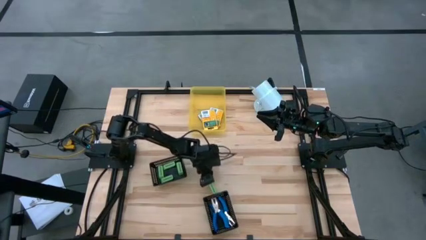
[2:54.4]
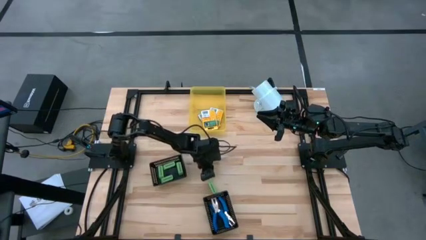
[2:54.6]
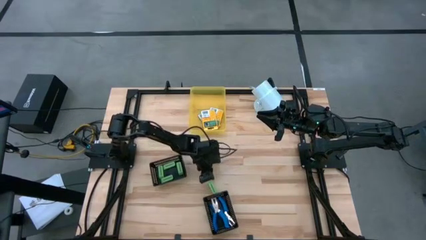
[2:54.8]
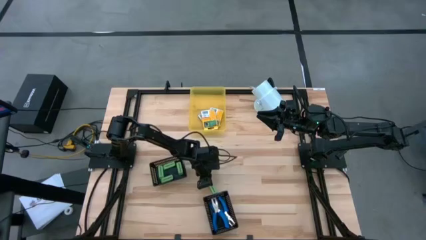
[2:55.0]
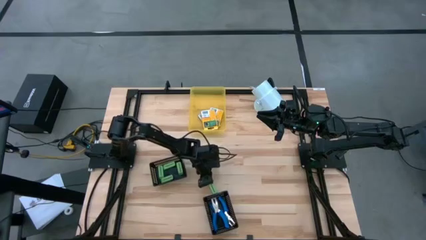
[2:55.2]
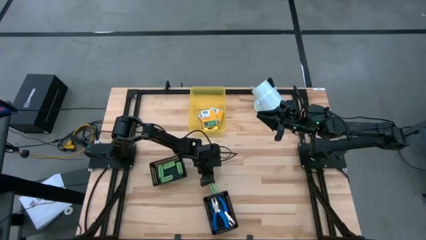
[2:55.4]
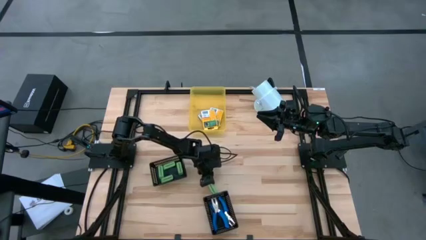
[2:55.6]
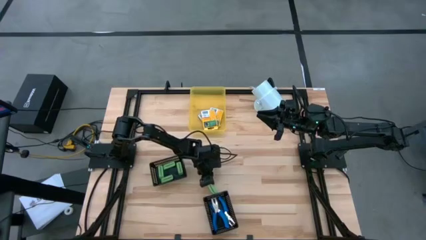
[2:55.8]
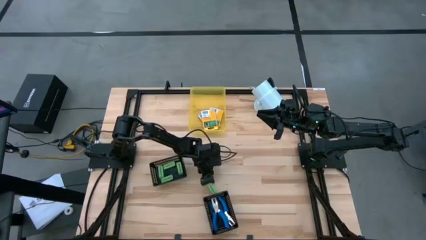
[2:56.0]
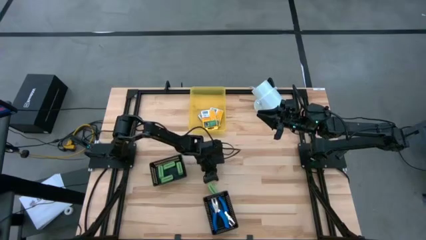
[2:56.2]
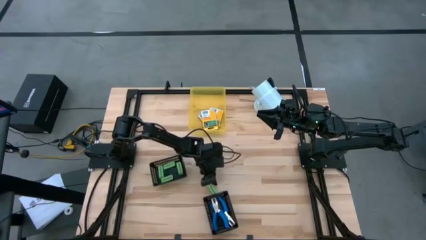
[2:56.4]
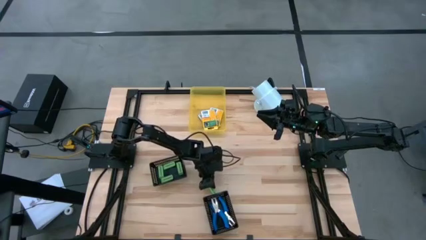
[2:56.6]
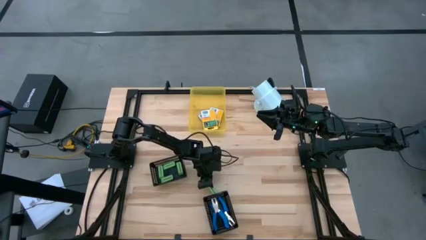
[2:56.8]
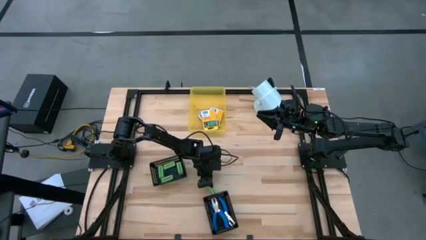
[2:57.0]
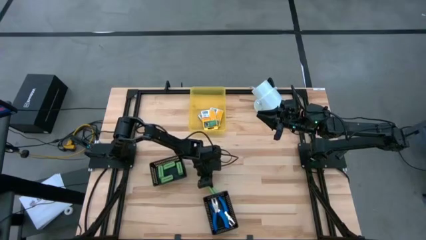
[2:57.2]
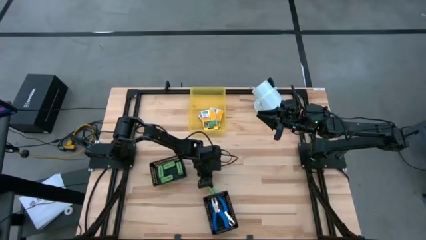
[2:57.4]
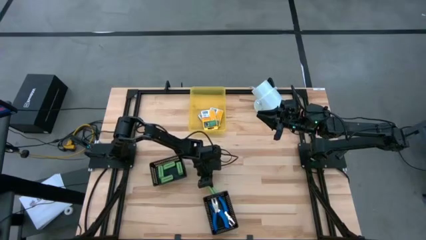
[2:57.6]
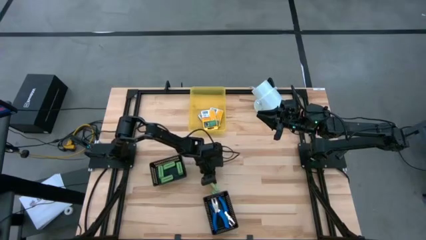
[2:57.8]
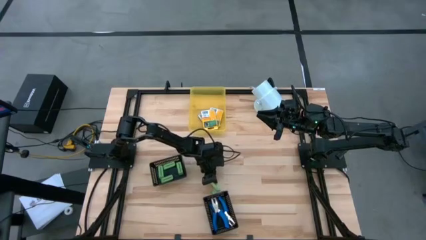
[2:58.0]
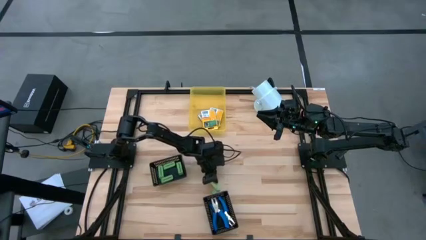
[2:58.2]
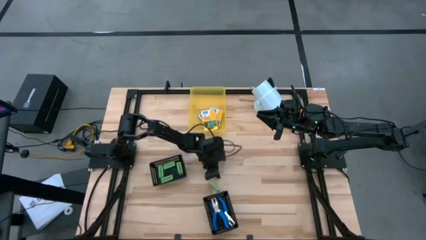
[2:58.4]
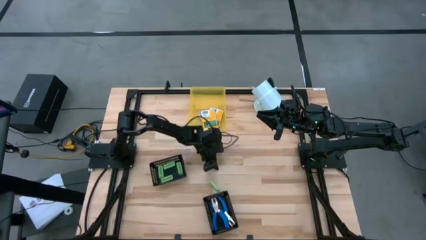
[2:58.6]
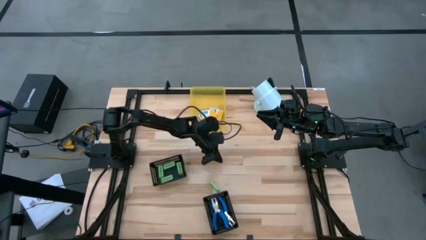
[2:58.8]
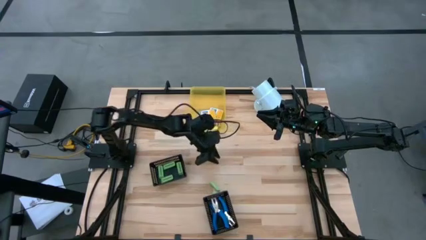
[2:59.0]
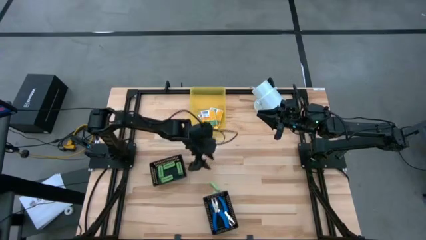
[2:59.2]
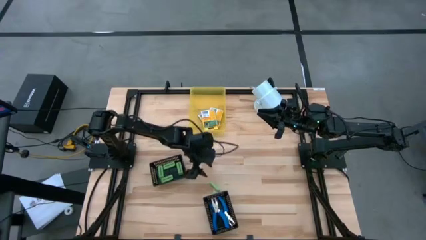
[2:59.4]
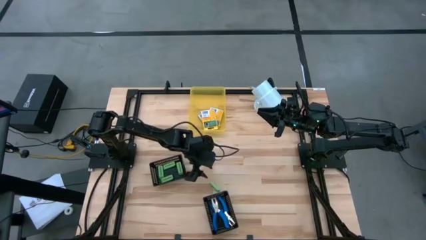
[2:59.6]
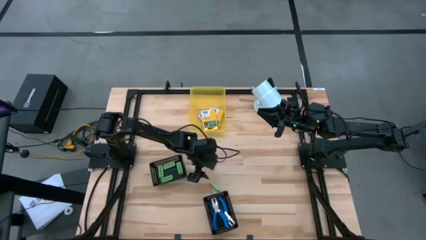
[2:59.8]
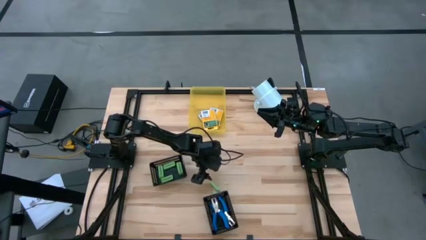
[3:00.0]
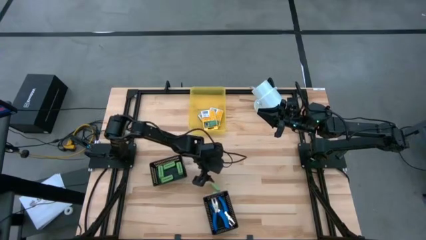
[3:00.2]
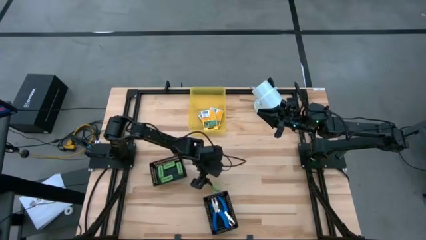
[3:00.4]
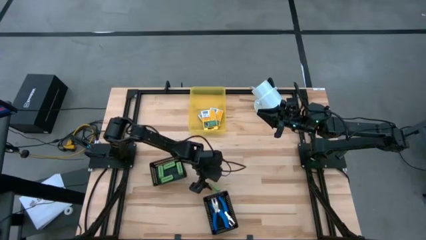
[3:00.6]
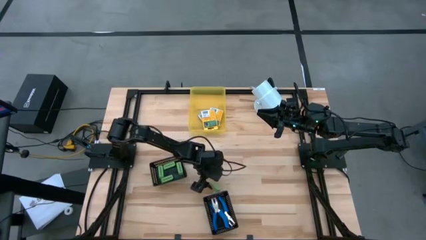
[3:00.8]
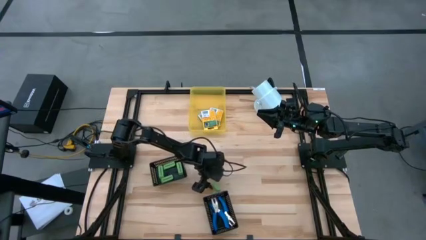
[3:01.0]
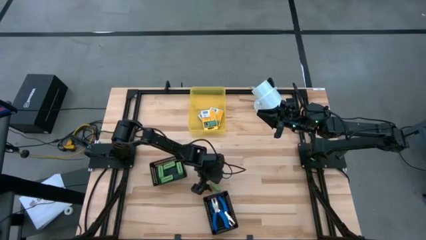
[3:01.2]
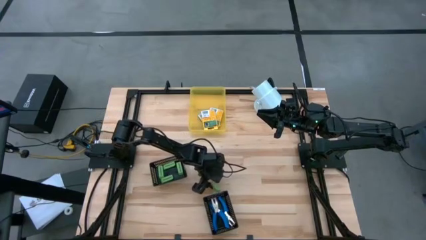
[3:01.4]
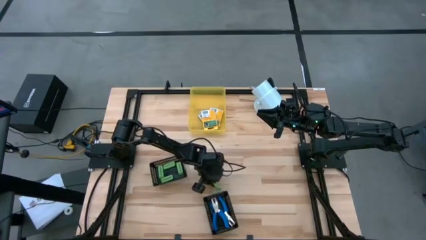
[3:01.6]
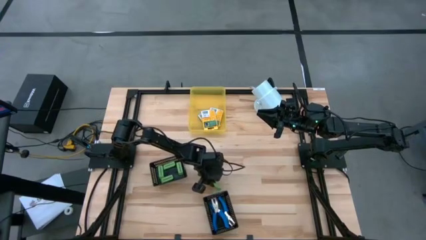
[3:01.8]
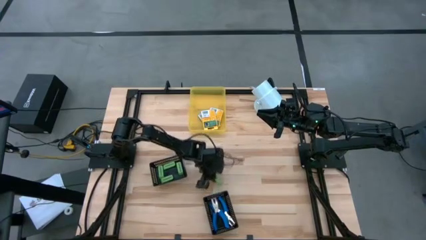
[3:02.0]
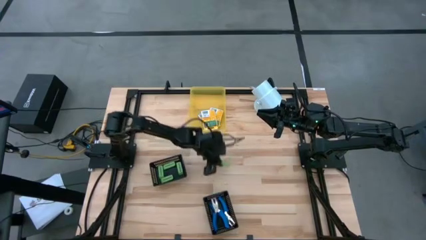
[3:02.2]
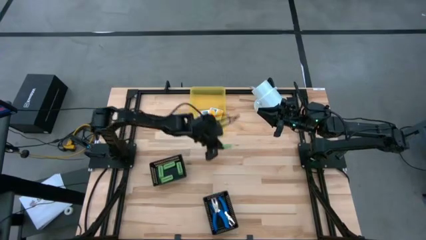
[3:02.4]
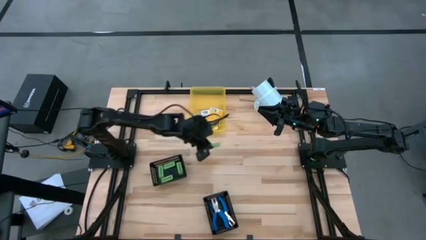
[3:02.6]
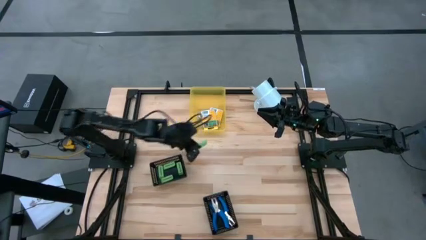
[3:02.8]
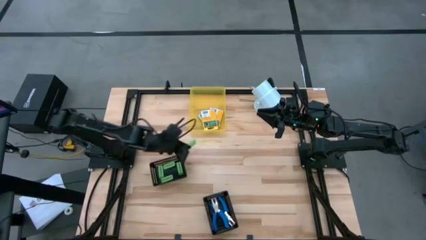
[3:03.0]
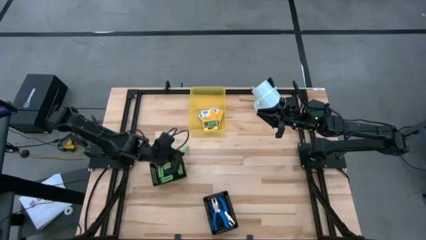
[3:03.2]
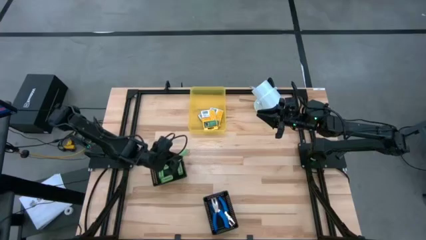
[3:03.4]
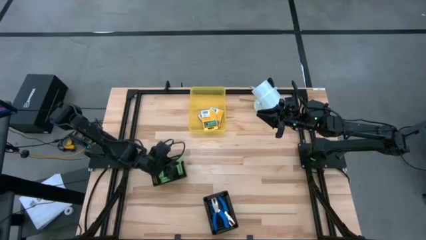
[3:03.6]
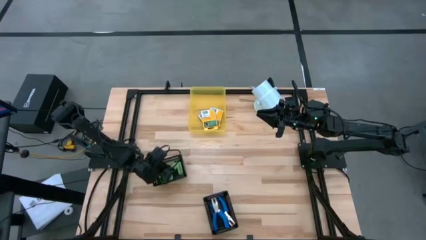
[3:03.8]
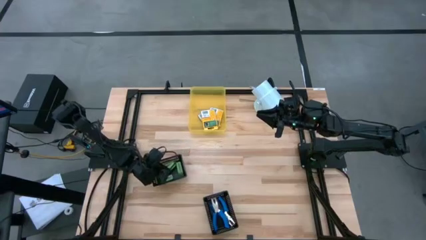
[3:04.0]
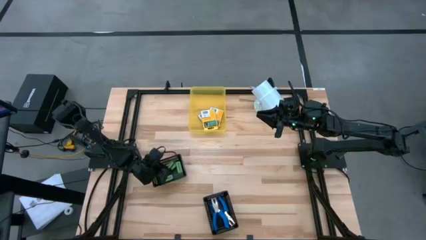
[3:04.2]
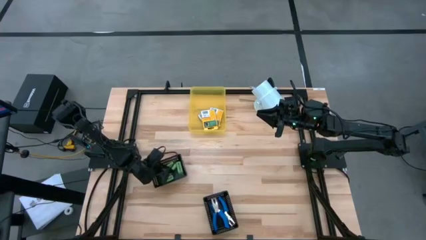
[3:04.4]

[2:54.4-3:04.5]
Task: Pick & Place School Supplies
Put the green eraser into the left black bin

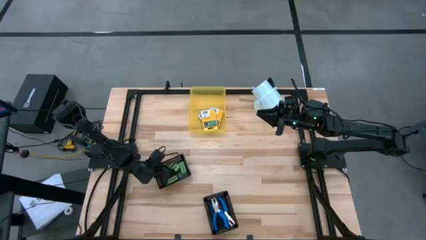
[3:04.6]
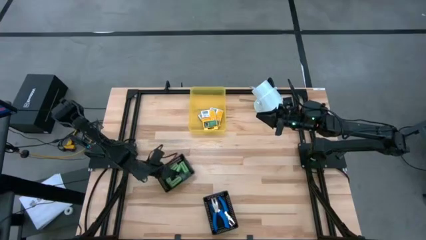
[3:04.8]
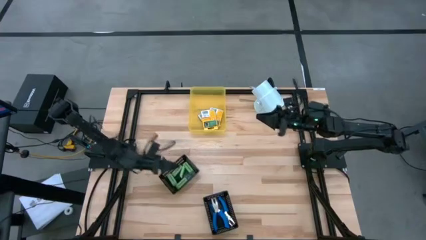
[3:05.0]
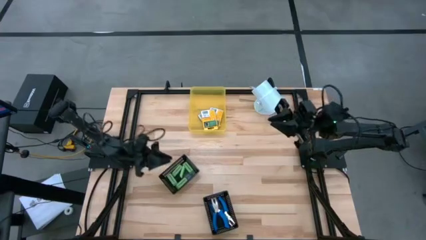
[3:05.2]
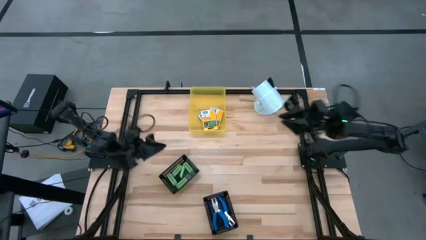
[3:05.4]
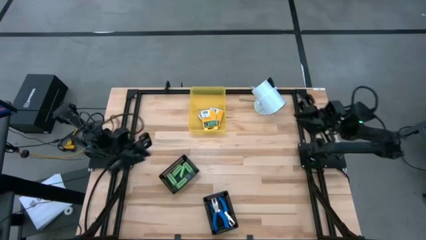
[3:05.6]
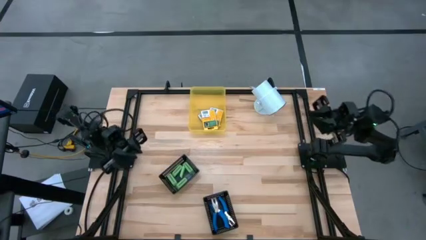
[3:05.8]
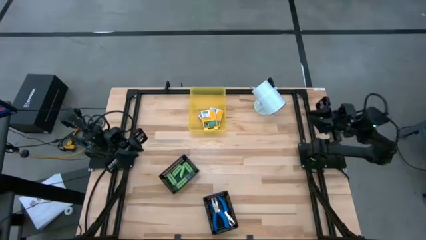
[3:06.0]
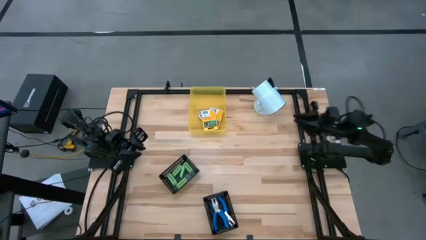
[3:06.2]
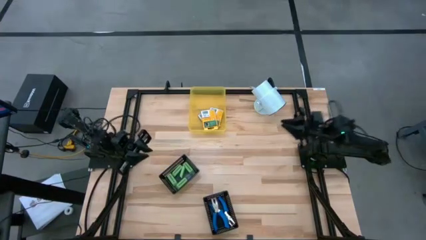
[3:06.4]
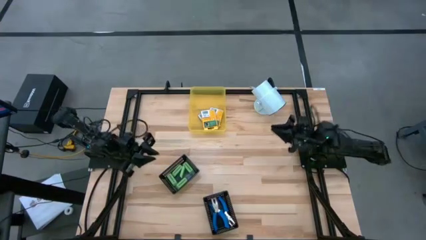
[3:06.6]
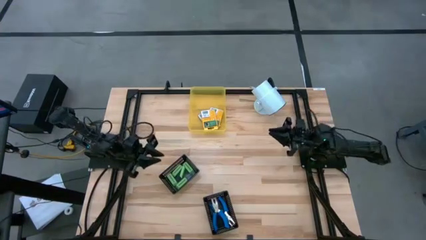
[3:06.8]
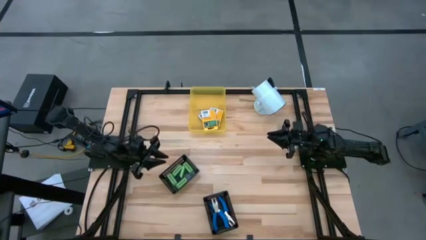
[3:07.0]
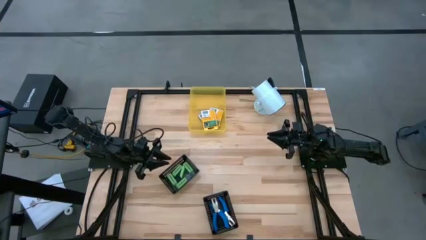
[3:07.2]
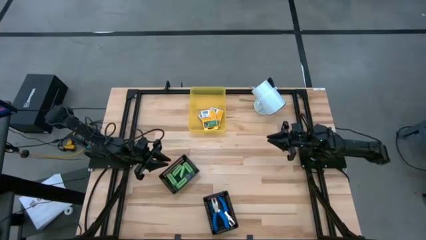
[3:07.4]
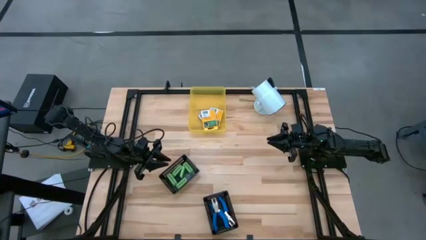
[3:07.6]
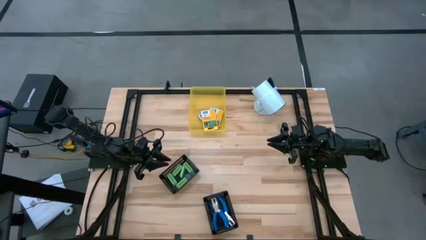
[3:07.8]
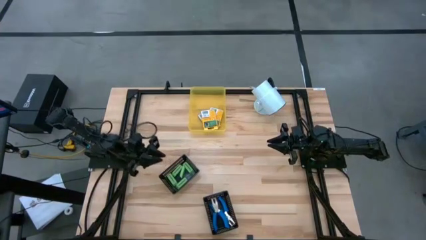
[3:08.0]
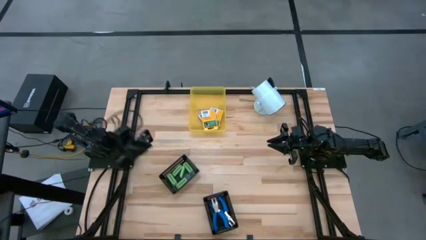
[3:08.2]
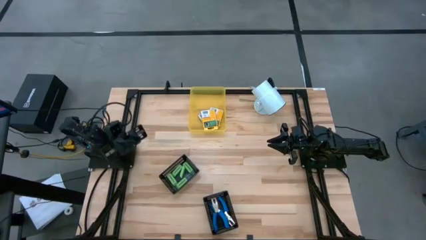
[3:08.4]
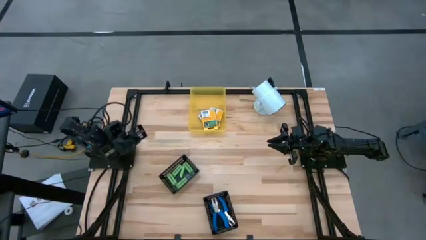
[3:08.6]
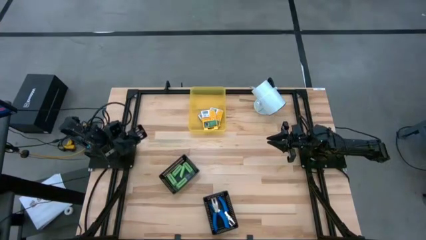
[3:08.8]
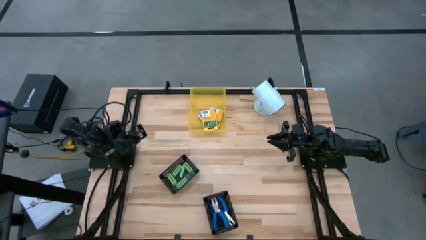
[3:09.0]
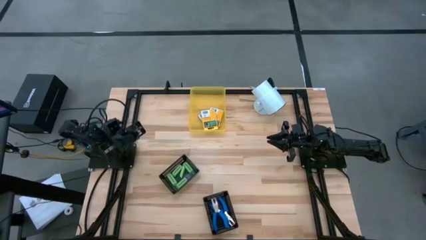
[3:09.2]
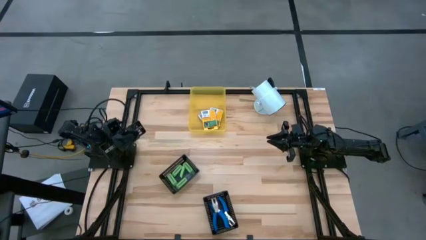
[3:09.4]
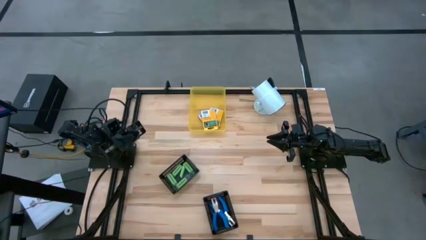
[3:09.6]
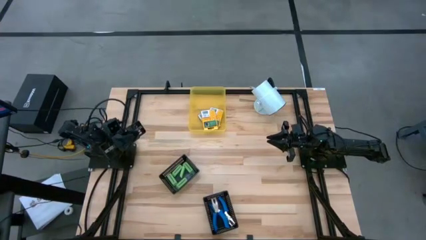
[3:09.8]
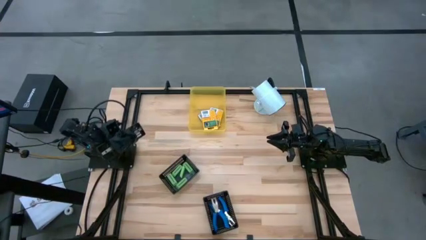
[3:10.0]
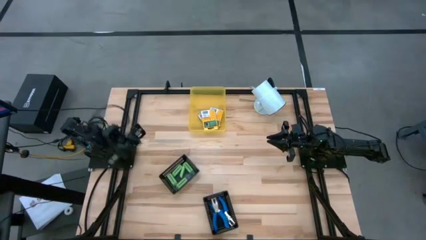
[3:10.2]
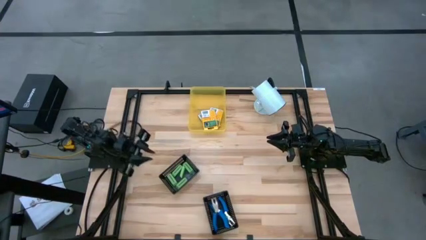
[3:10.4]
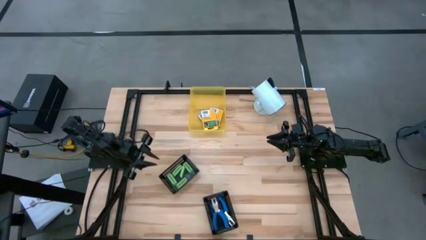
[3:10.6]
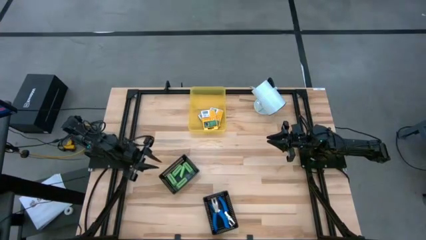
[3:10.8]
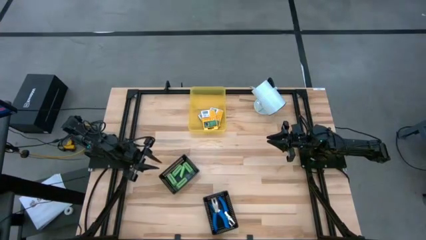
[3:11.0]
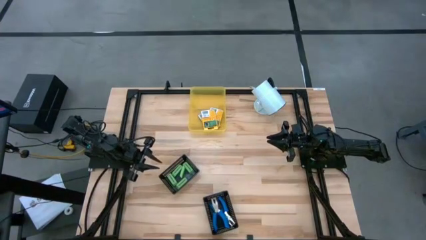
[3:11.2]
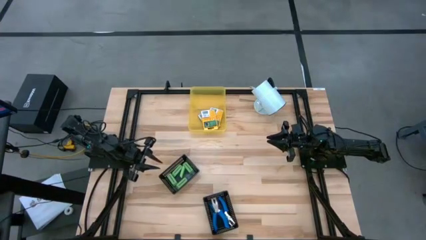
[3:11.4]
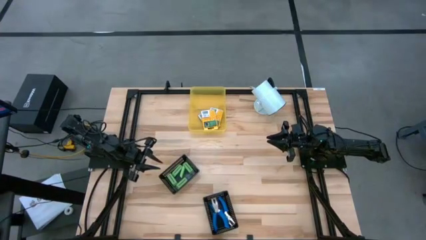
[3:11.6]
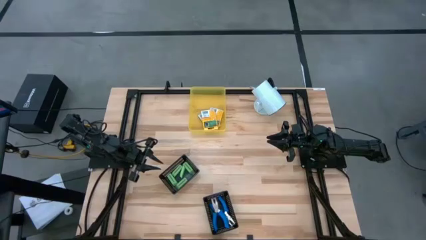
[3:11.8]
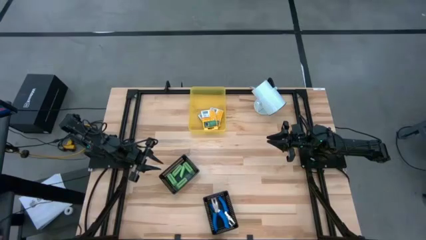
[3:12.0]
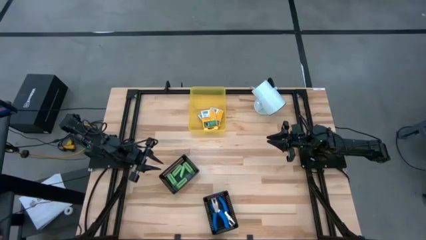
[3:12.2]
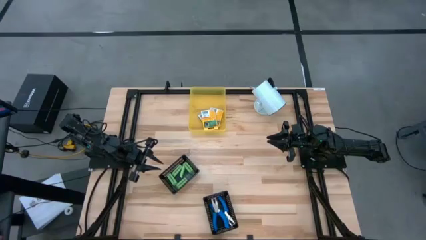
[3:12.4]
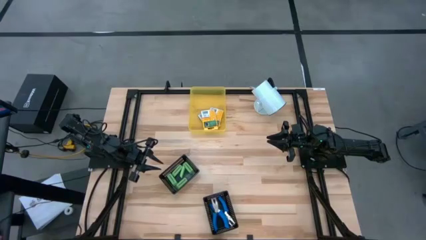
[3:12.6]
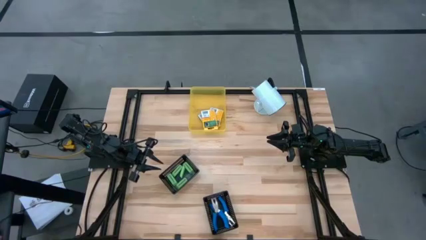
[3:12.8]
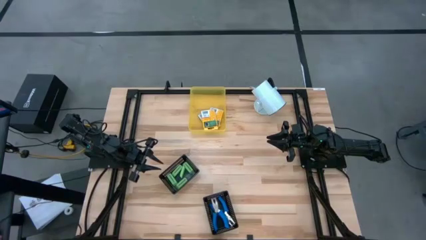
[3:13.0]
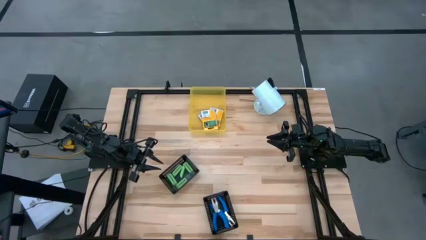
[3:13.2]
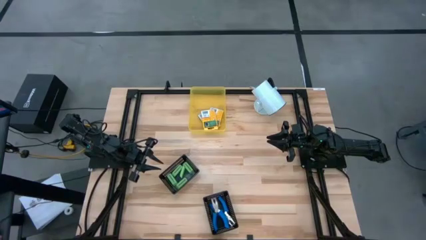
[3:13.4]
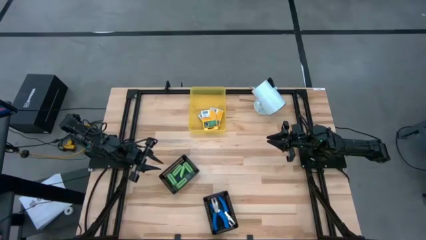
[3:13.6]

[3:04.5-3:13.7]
Return to Home Position
